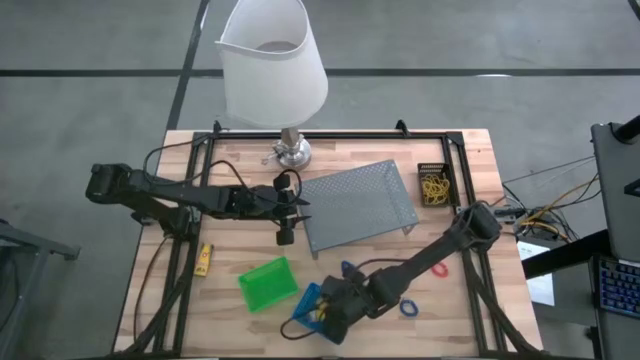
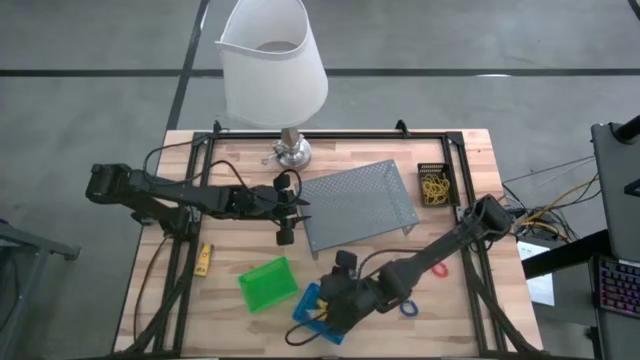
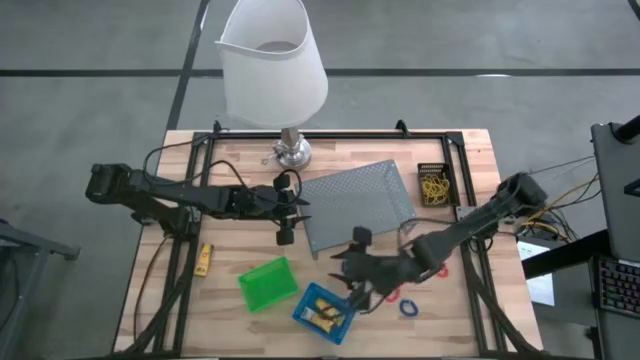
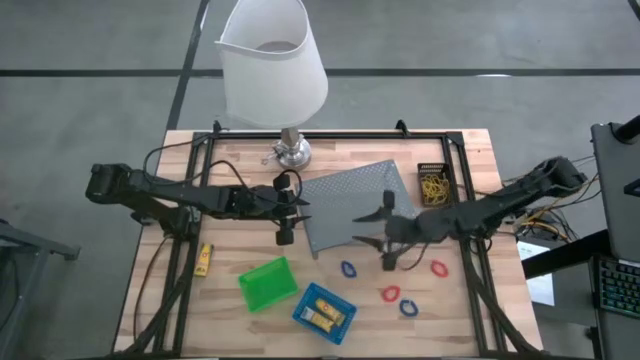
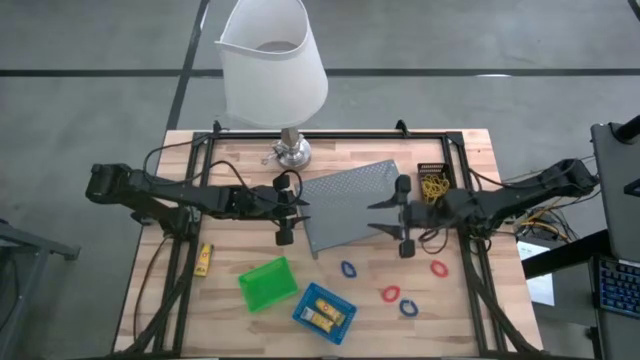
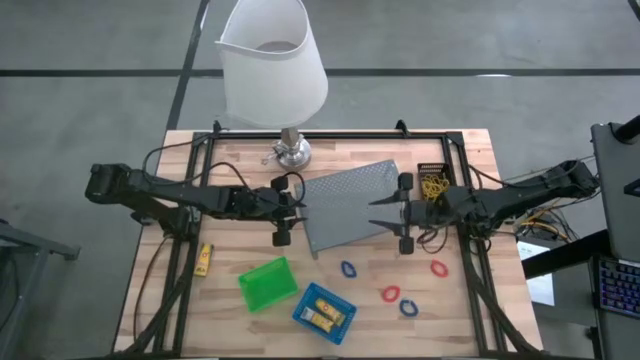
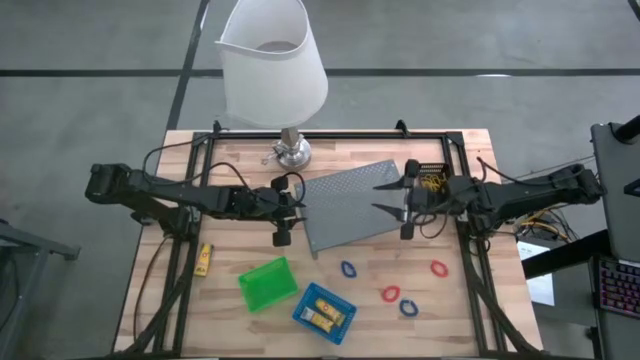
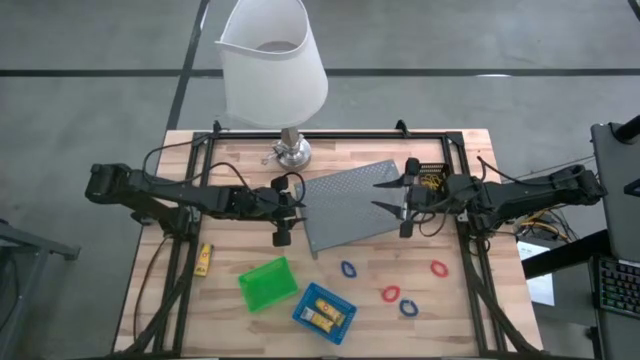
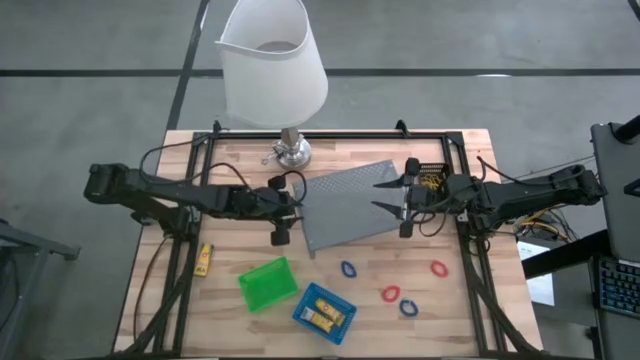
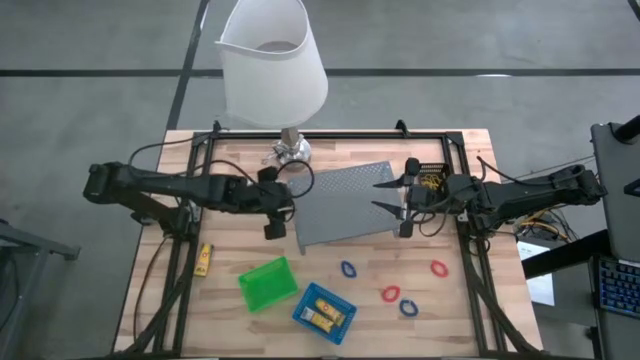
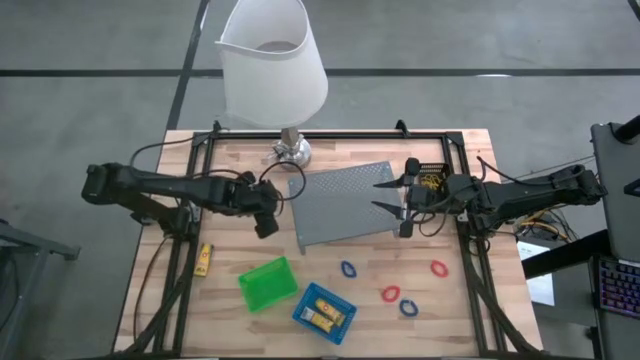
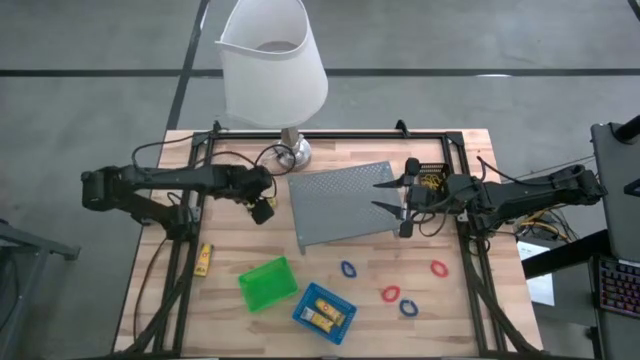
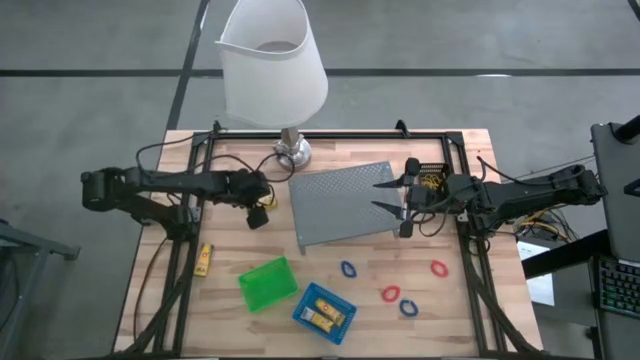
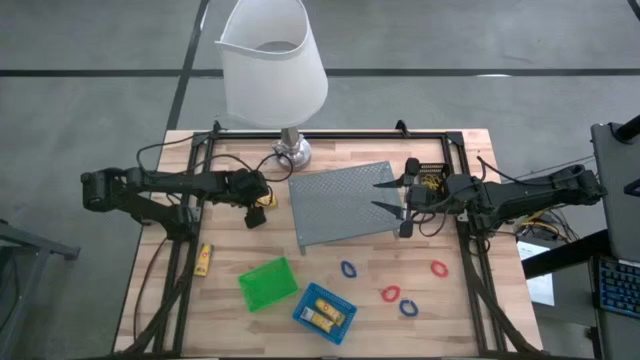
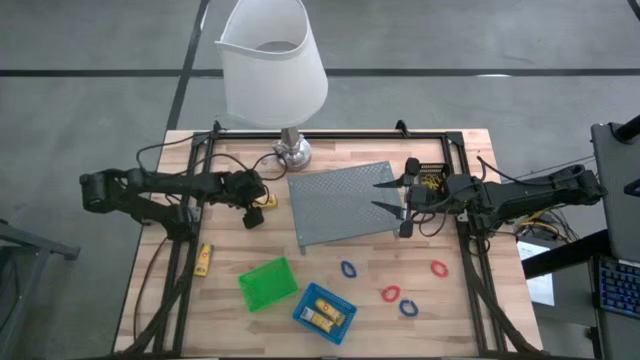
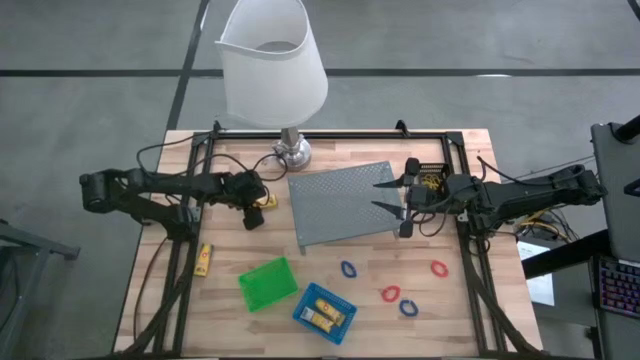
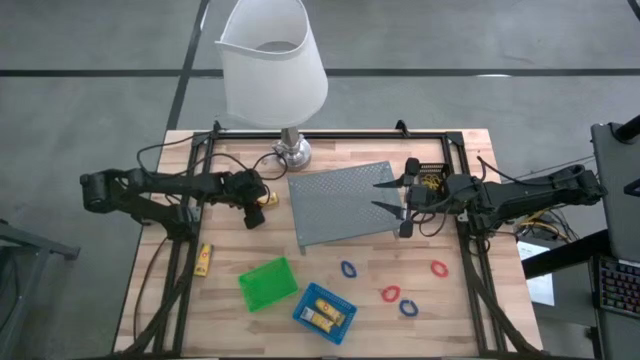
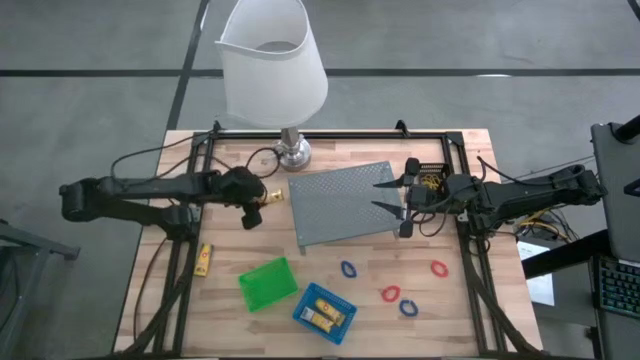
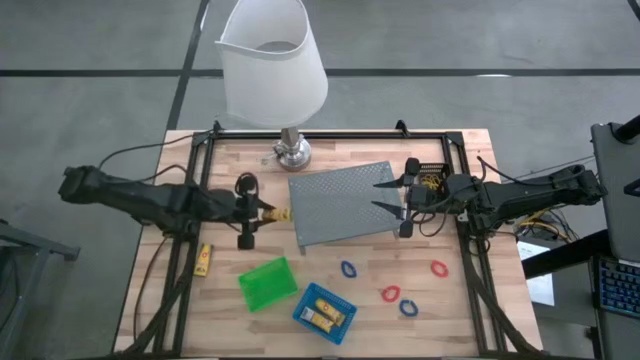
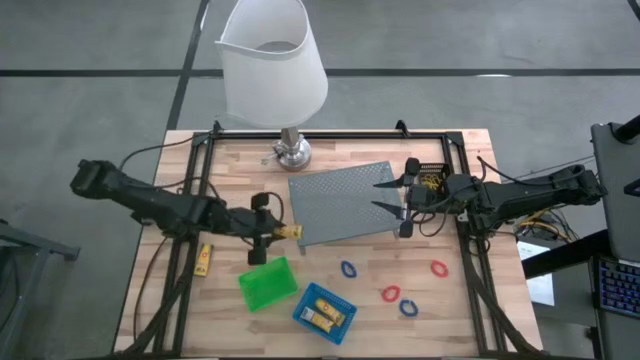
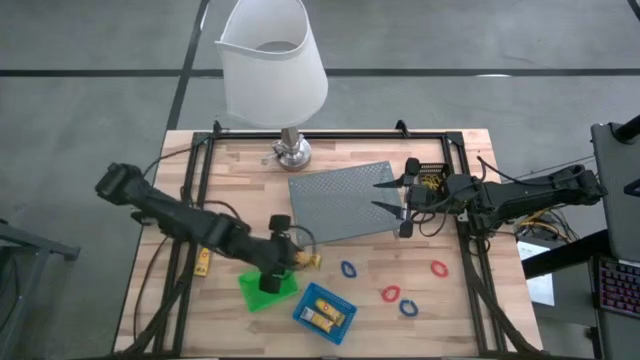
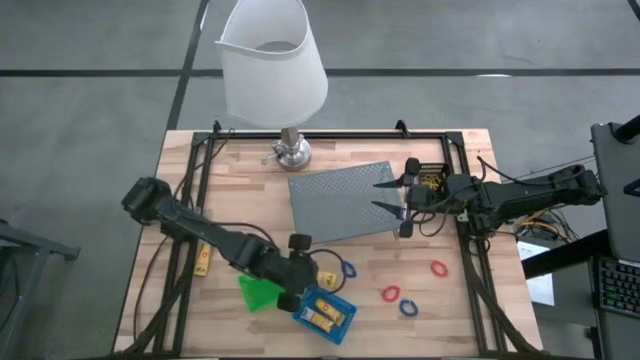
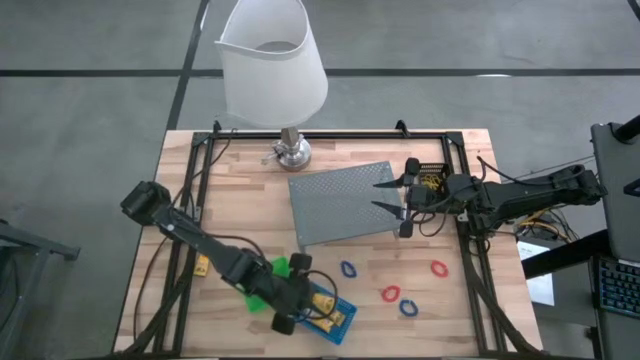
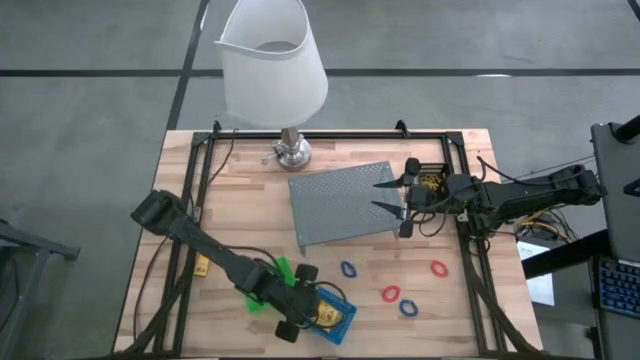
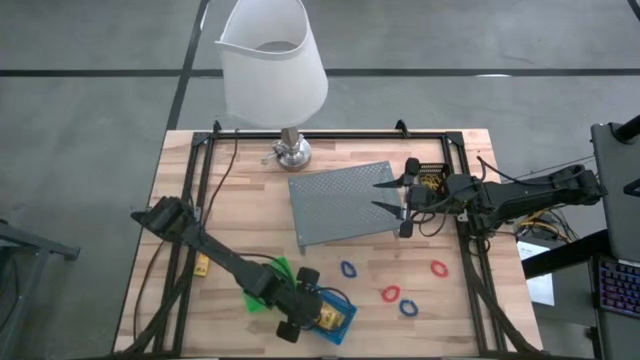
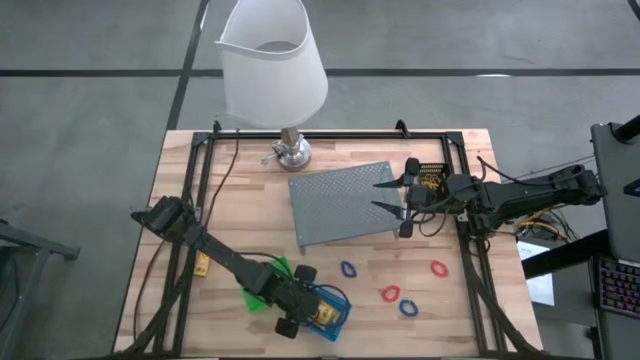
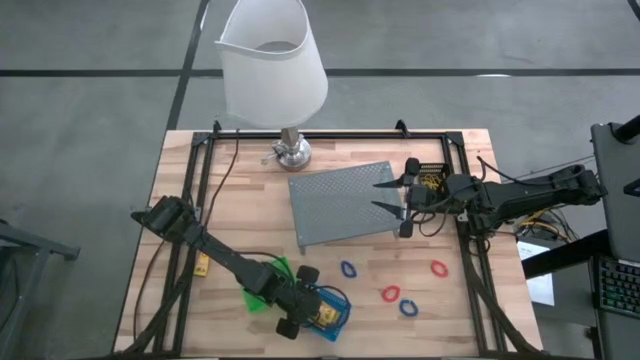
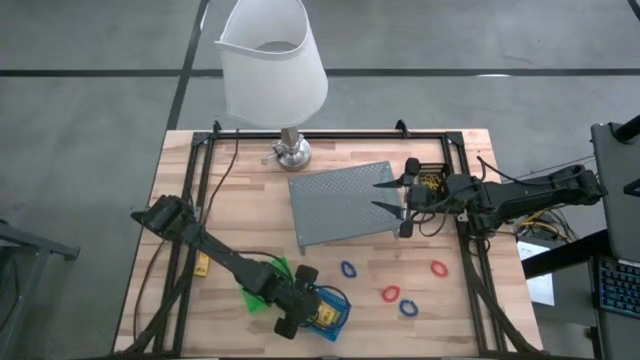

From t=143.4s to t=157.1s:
Task: Pick & Place Office Desk Supplies
Put the crayon box into the blue basket

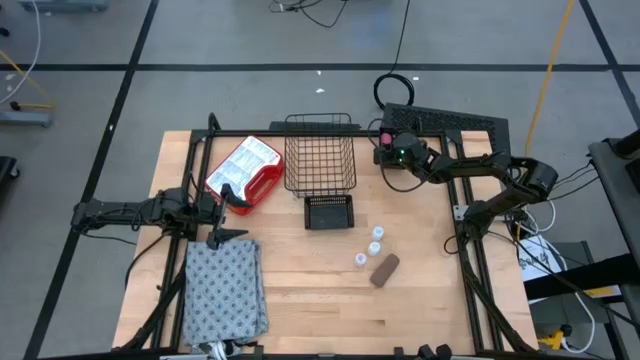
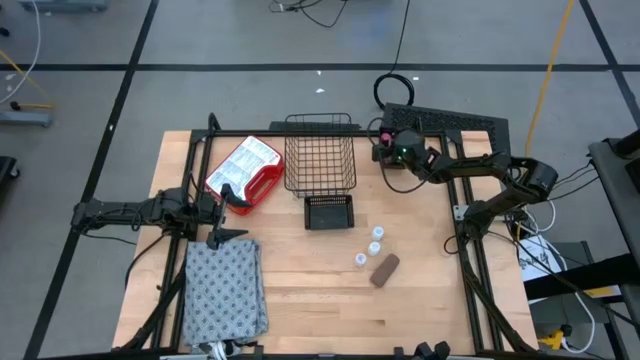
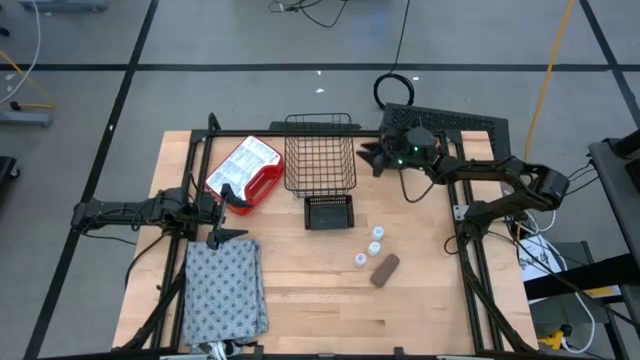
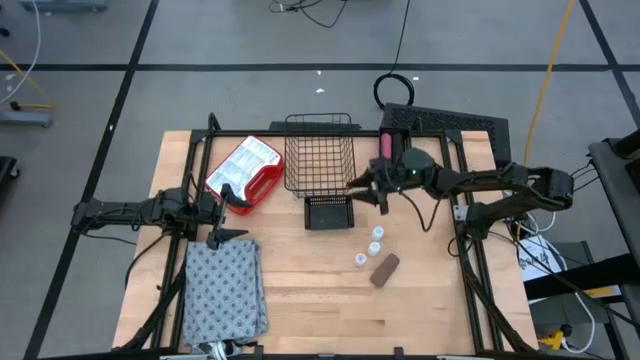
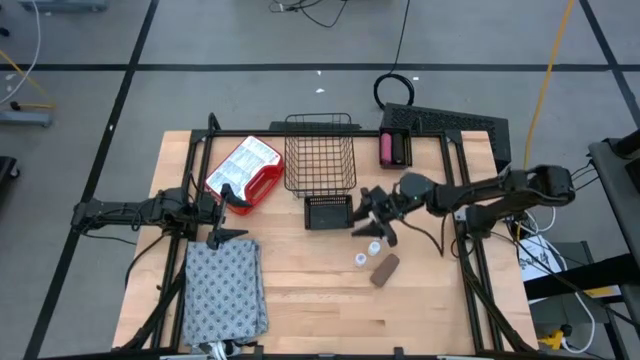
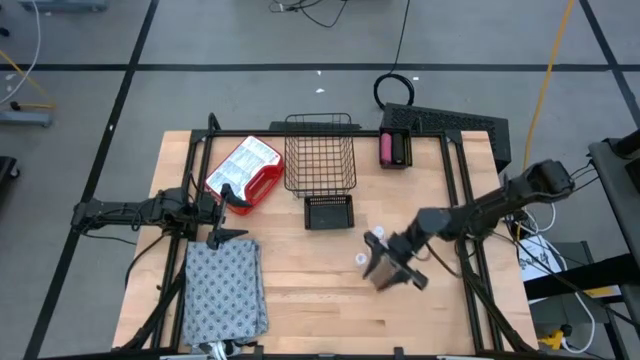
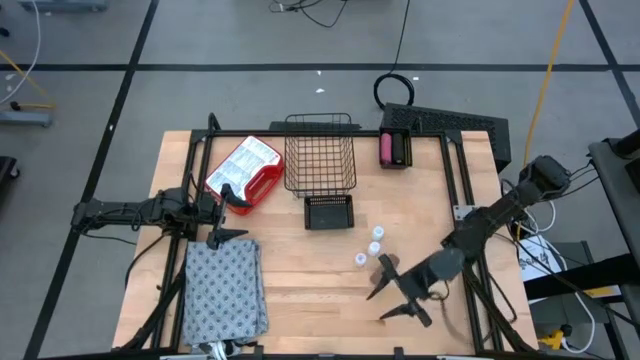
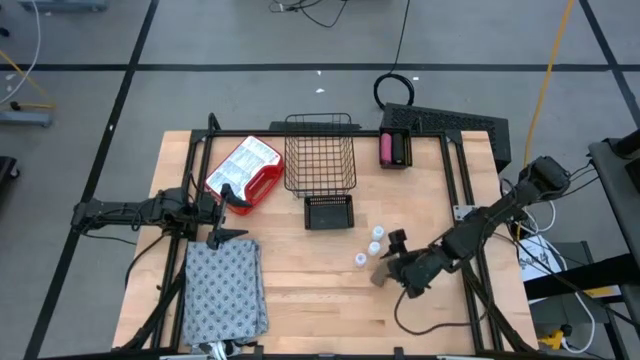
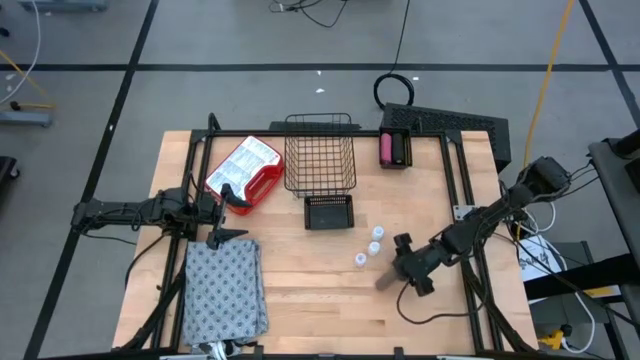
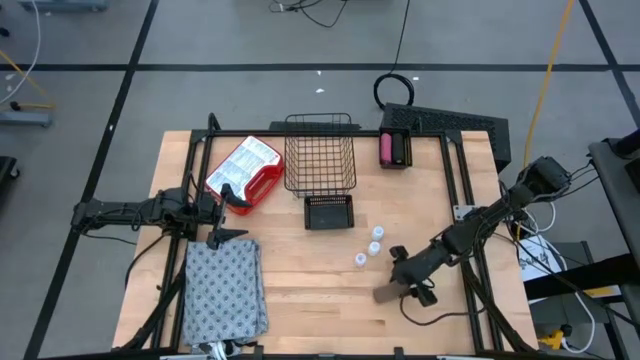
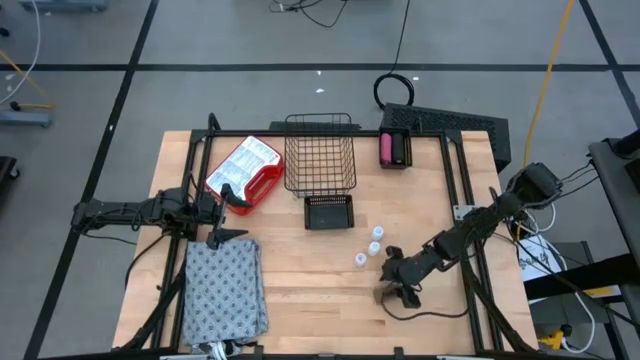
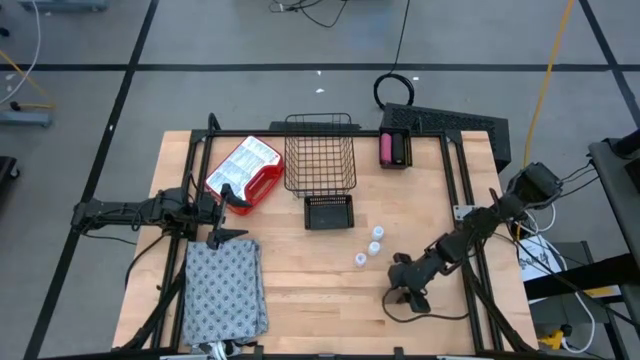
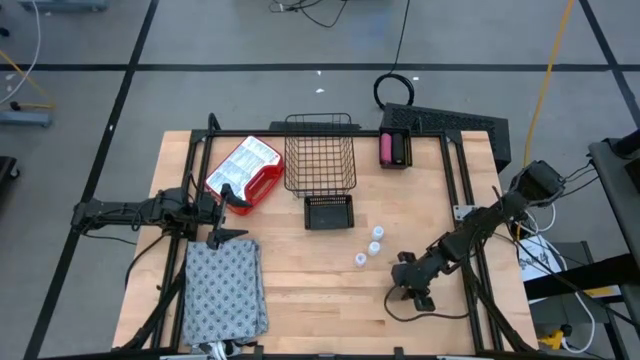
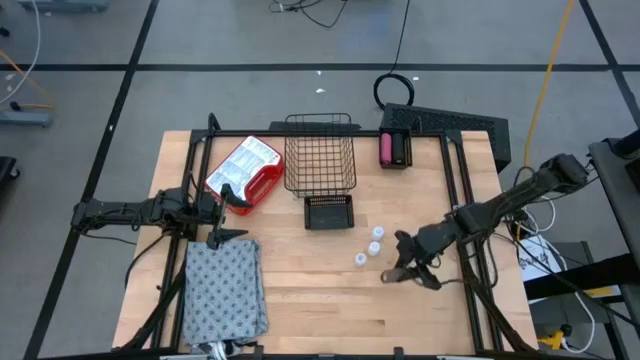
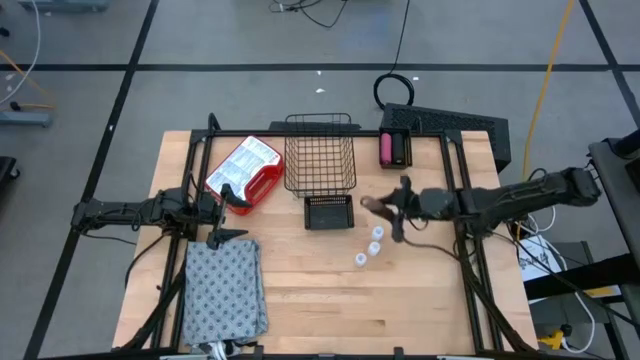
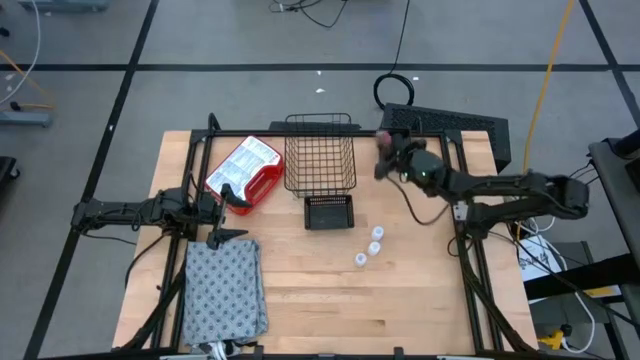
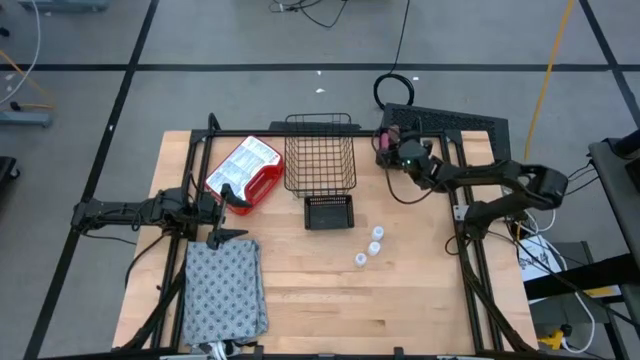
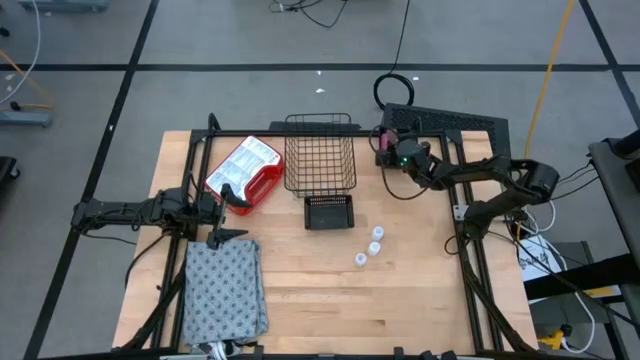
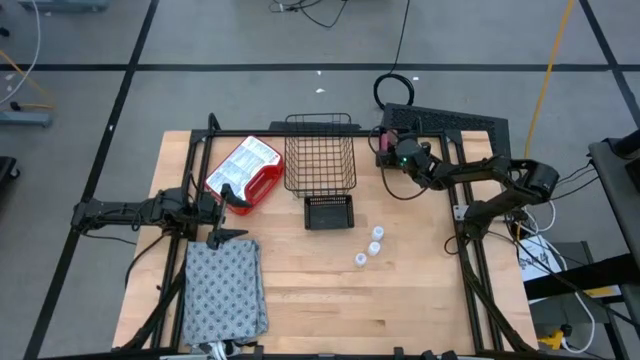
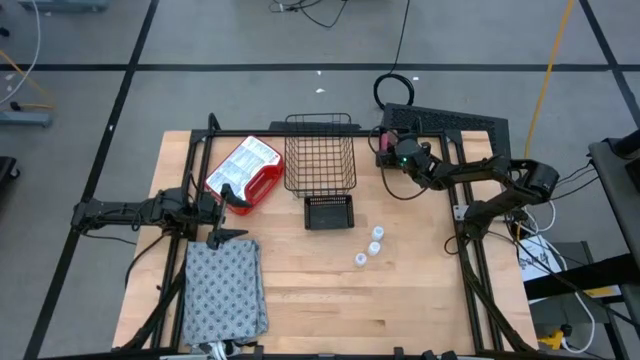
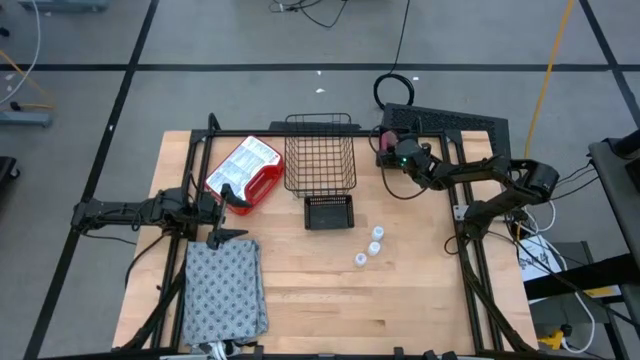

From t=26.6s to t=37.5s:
Task: Pick & place medical supplies in basket/bin
Put the rolled brown bandage into the top black bin
